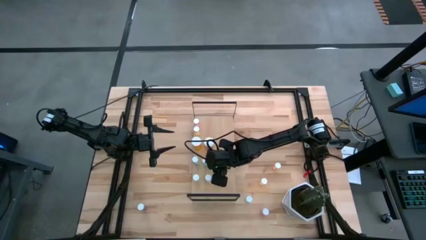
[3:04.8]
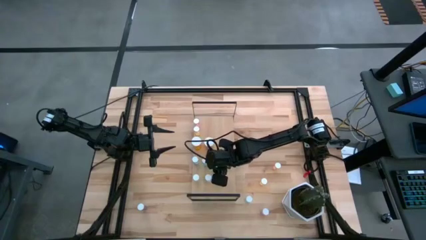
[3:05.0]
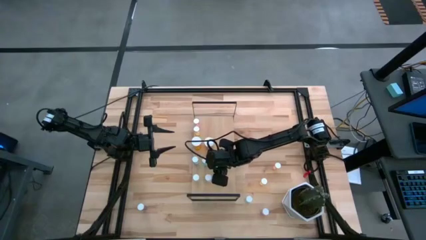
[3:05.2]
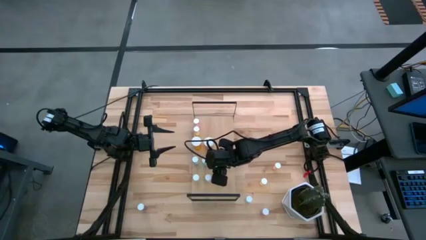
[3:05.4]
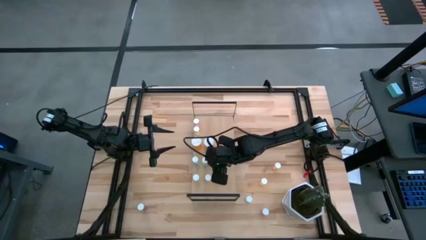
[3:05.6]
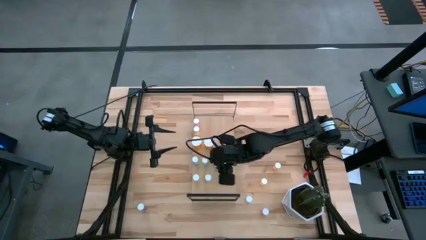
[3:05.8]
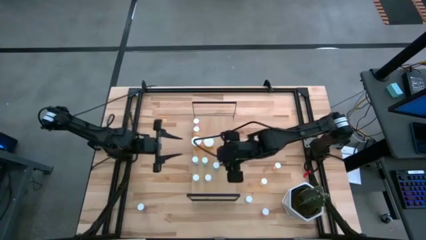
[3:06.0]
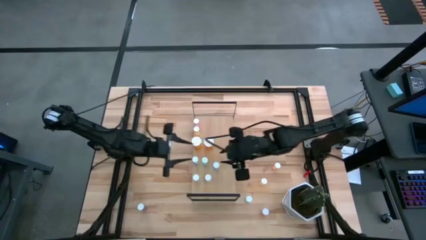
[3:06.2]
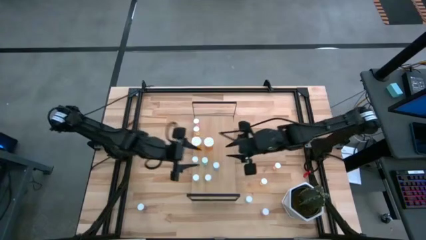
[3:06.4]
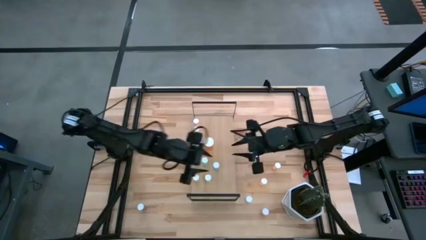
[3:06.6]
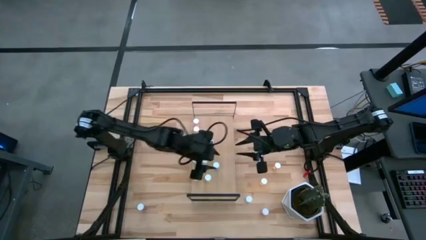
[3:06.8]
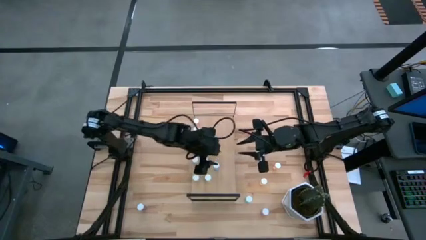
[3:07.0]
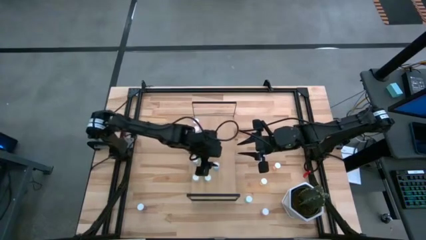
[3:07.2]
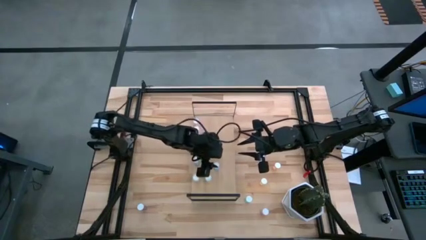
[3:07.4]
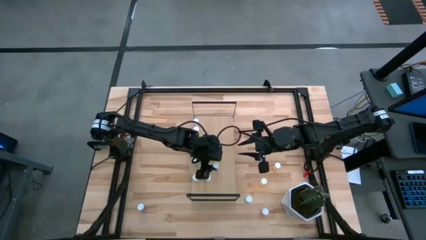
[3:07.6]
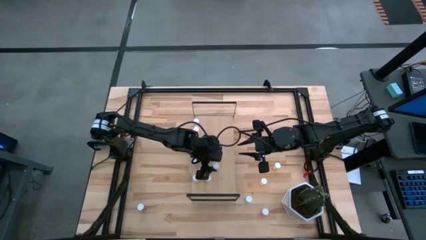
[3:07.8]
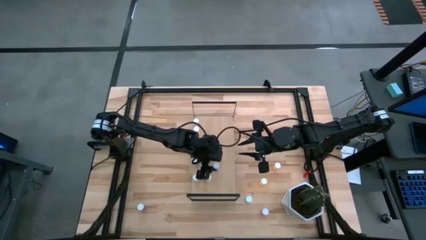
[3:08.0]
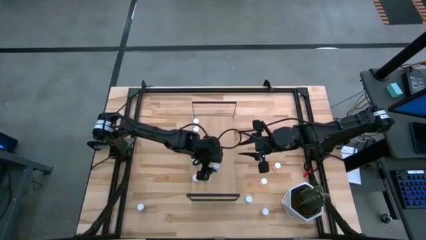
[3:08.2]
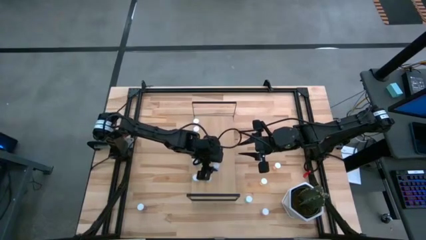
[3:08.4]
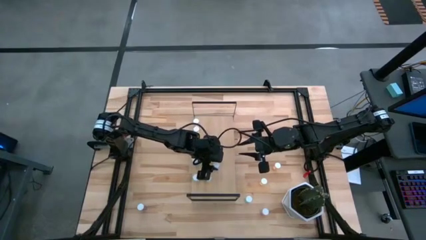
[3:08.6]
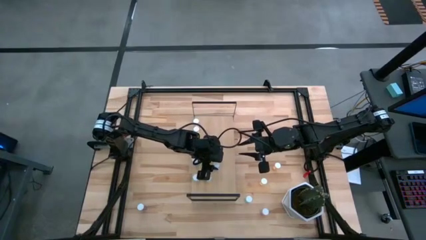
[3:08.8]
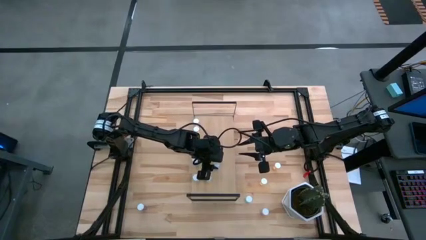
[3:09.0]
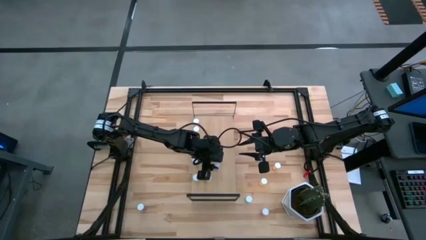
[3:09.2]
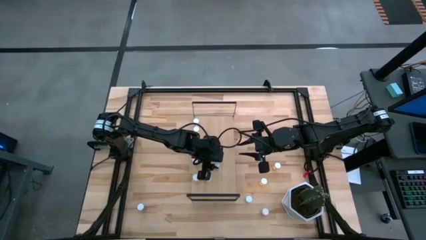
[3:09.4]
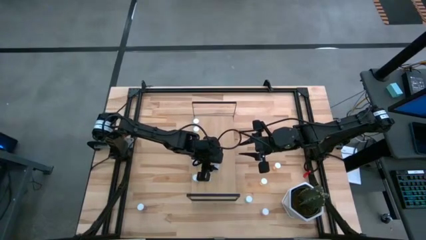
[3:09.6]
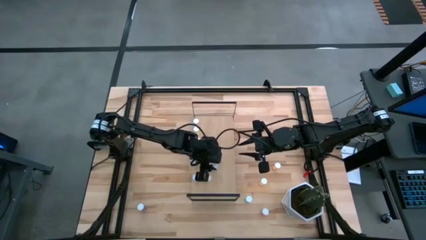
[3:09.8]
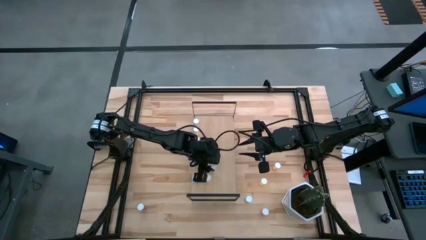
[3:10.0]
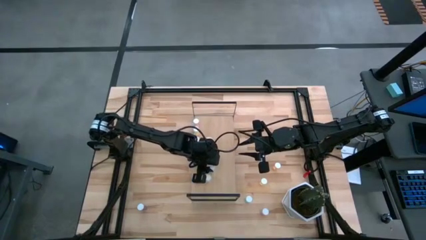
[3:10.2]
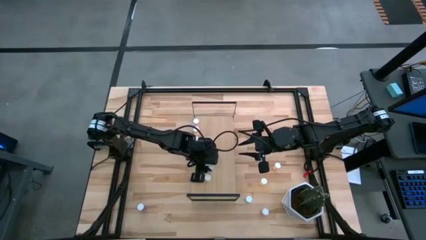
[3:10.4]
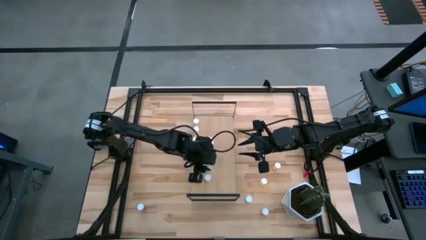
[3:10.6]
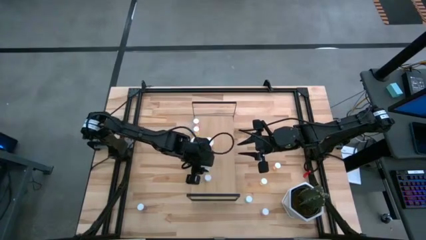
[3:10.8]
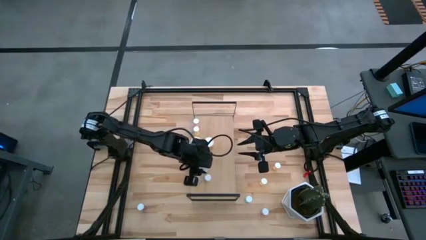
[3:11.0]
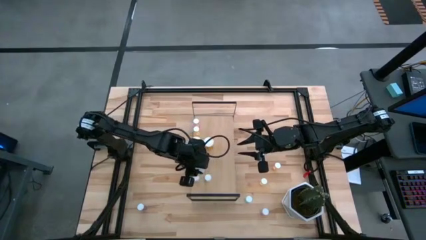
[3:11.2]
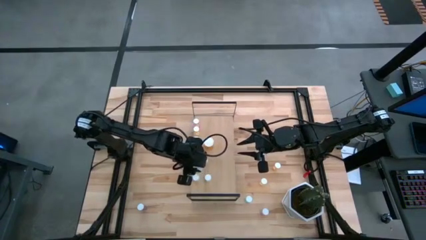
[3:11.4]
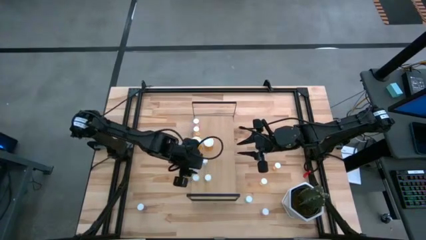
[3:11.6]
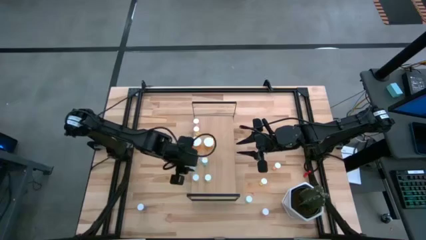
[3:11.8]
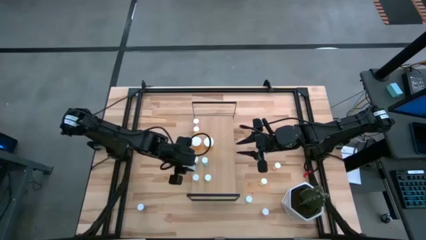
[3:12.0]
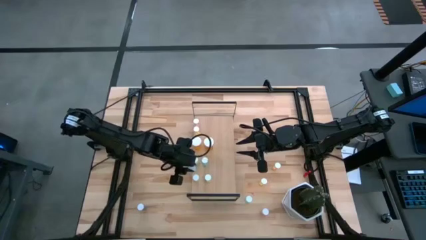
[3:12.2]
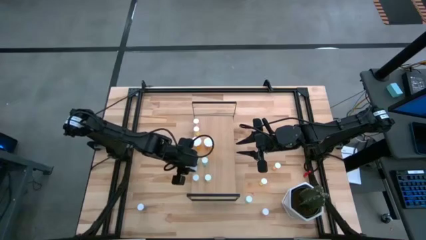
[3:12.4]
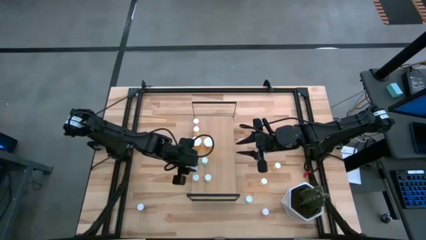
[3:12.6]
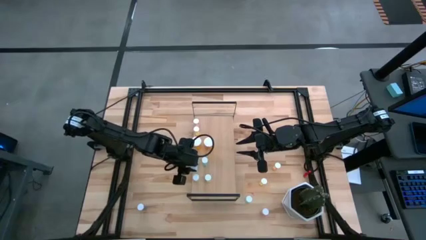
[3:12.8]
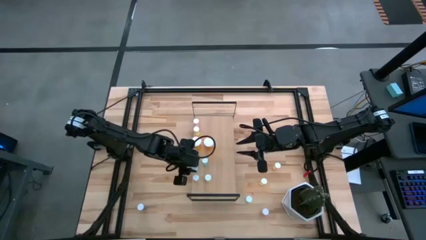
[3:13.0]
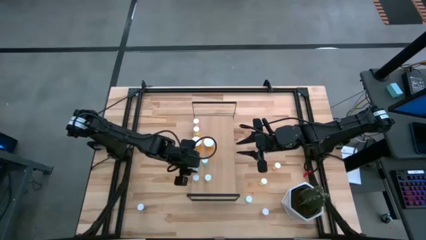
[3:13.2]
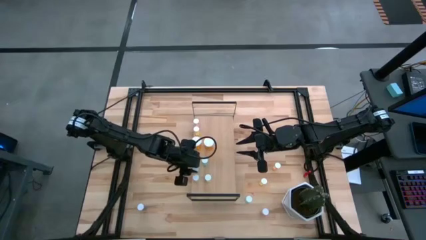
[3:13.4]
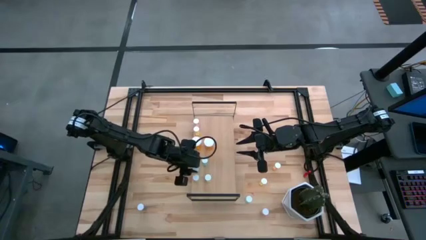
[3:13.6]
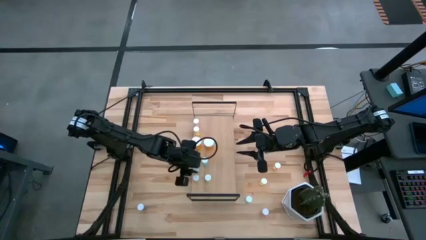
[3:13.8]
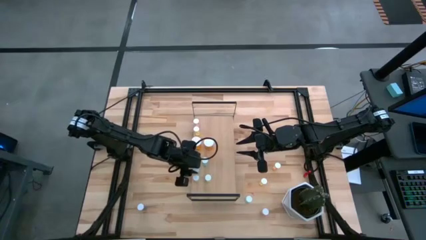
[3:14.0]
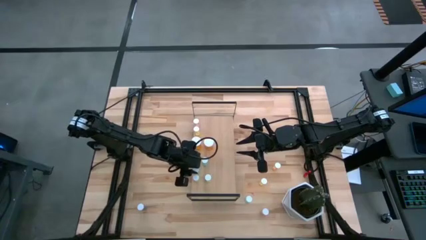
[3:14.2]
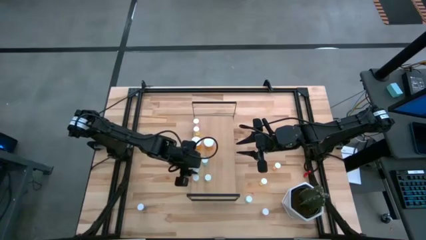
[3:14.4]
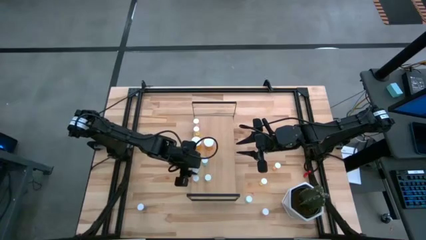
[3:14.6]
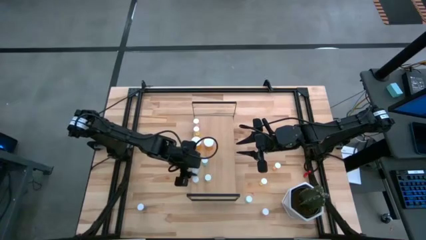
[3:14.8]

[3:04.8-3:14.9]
Task: Pick and place medicine bottles onto shelf by color
Put the blue pill bottle on the shelf

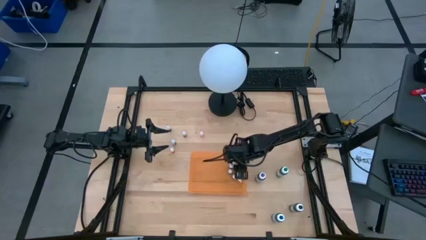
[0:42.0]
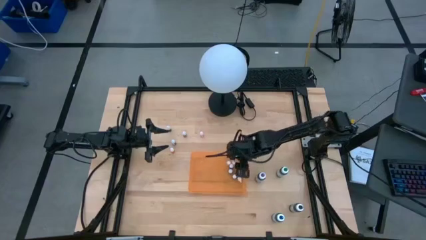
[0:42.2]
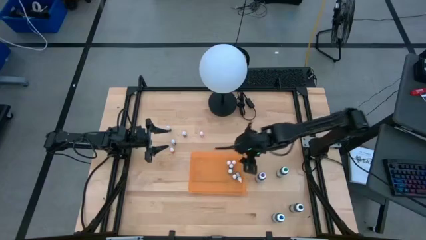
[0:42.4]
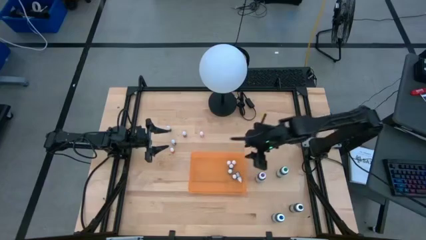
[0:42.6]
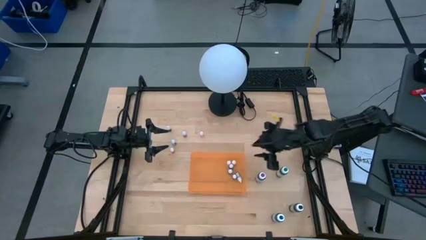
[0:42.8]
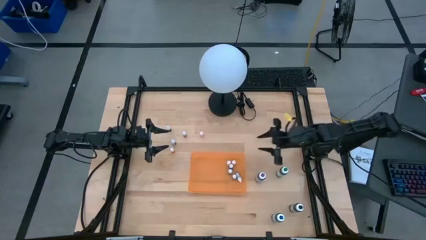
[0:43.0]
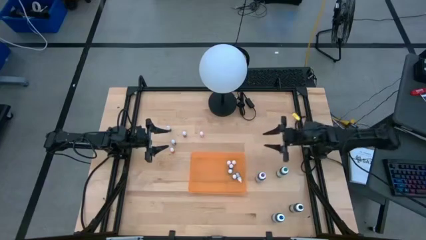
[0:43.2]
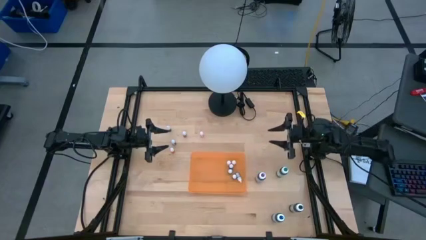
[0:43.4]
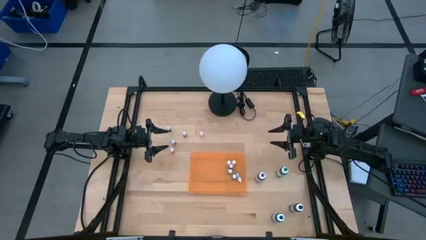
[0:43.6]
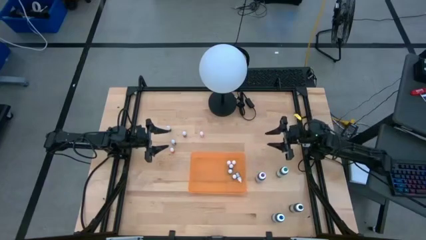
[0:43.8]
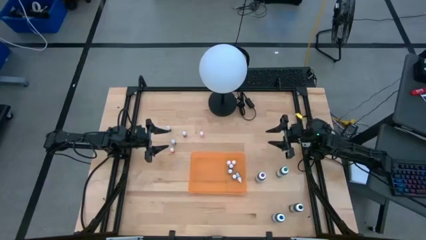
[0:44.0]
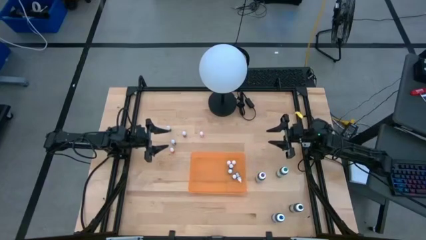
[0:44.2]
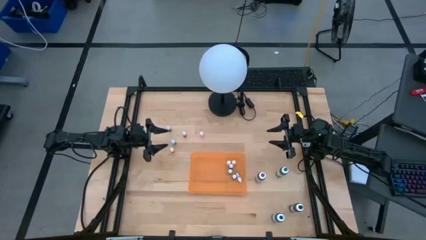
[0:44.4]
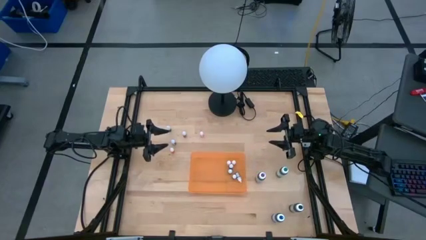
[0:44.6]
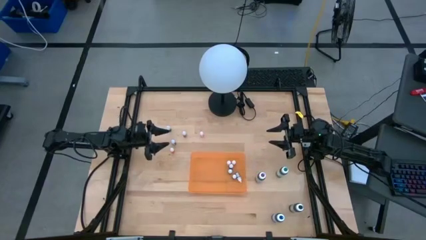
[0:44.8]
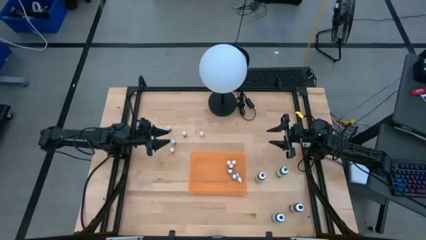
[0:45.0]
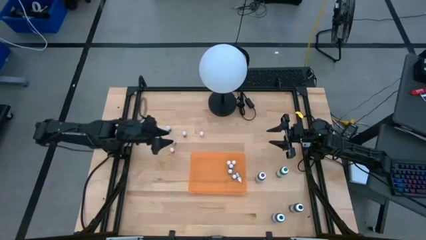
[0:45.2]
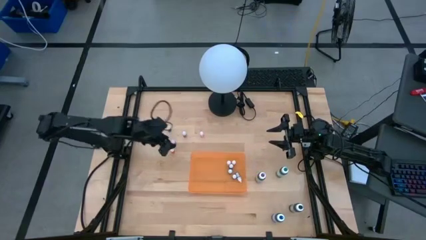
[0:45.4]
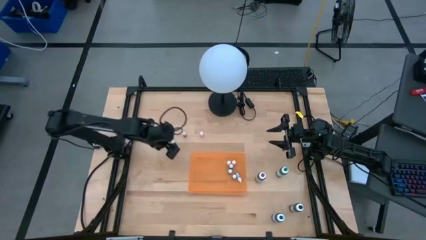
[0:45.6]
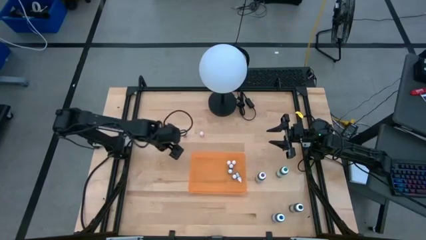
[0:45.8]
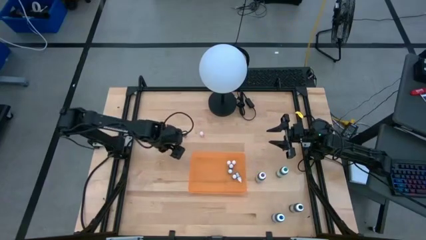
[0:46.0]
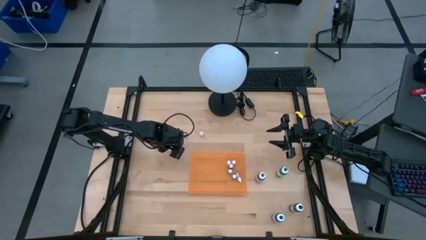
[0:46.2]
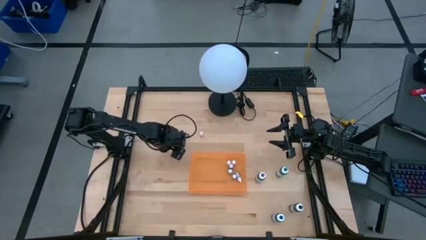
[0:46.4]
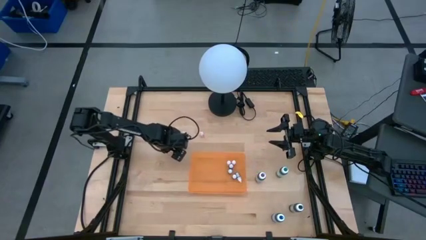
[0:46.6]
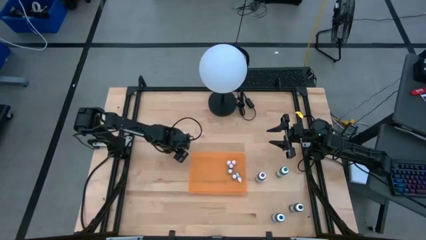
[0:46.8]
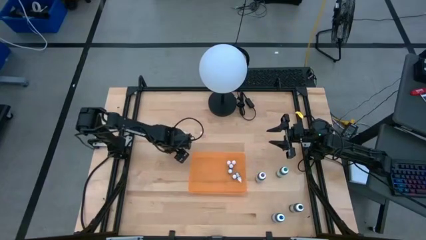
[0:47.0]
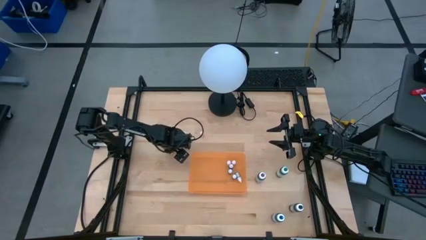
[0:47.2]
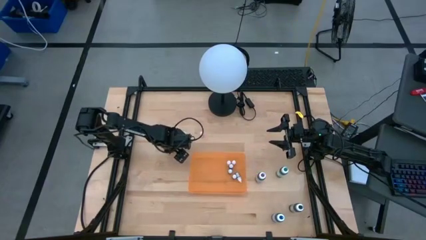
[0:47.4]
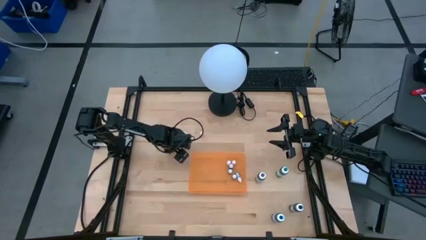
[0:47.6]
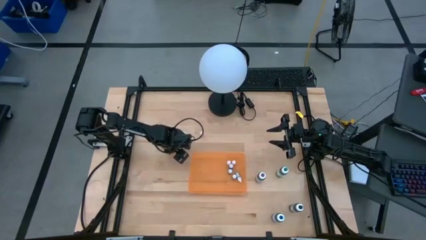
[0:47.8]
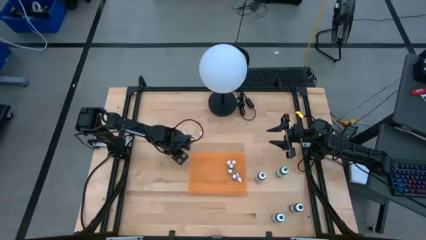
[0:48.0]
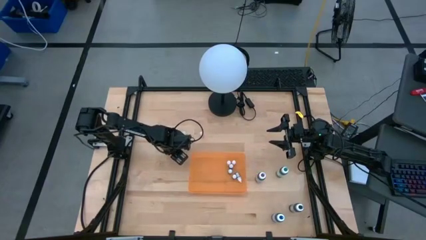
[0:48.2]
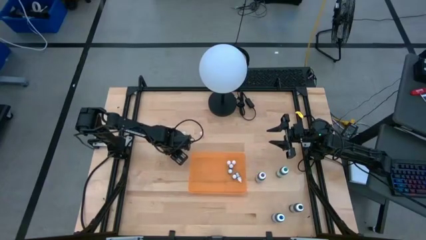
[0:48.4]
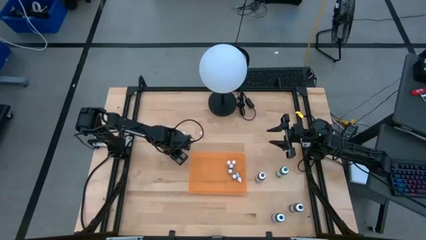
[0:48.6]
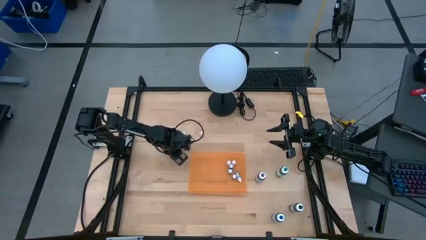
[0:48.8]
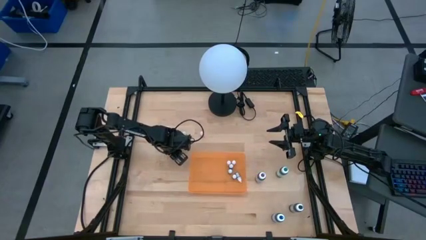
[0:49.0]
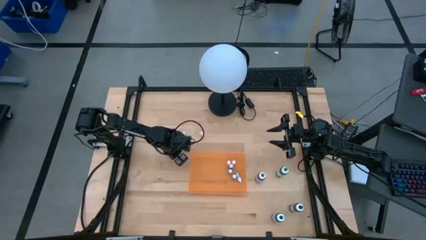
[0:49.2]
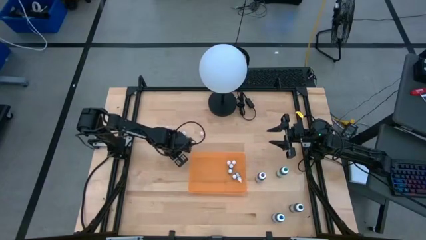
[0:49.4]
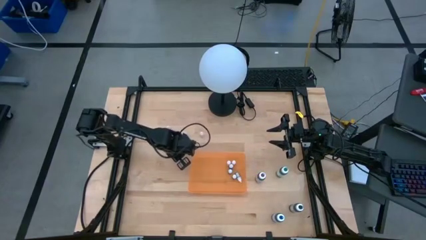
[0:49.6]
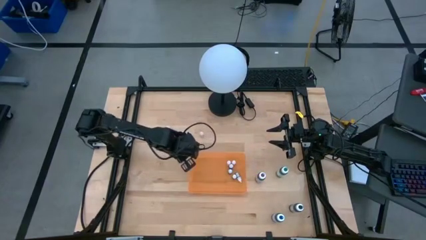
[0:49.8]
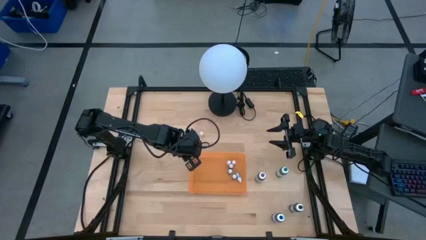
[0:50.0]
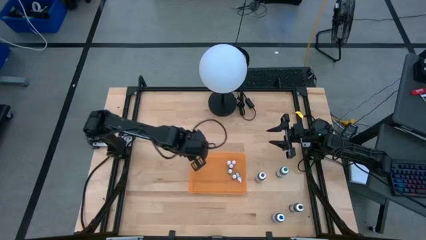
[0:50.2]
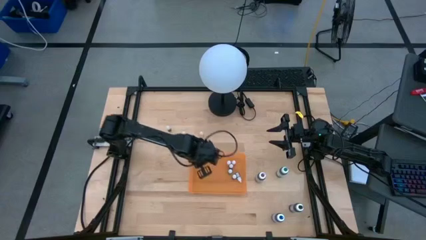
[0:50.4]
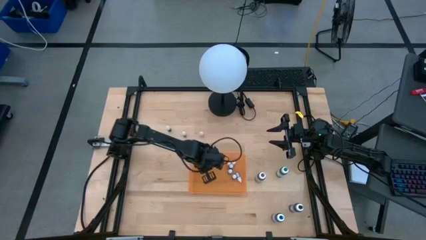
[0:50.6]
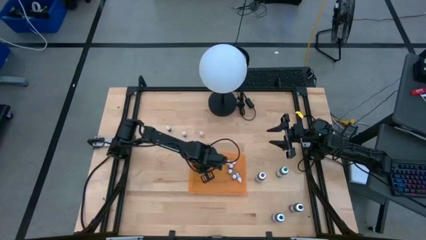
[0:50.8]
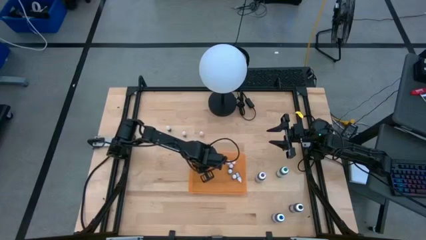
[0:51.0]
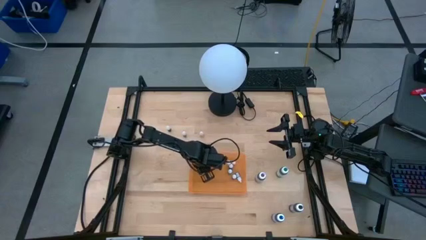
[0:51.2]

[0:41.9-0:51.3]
Task: Pick & Place food coloring
Put the small orange food coloring bottle into the orange container
